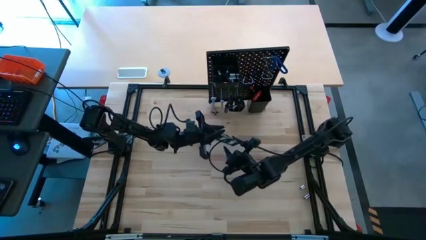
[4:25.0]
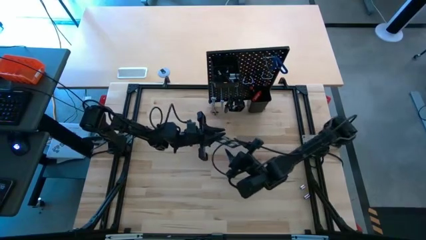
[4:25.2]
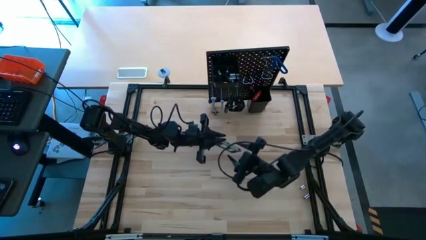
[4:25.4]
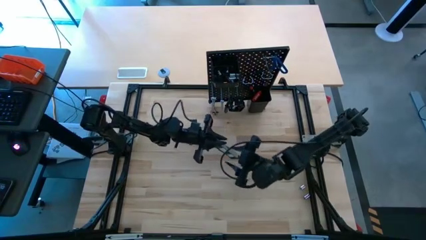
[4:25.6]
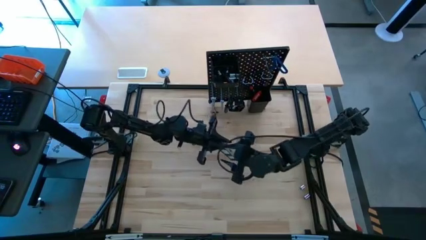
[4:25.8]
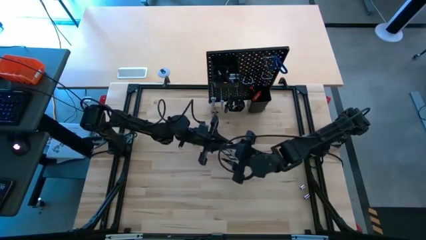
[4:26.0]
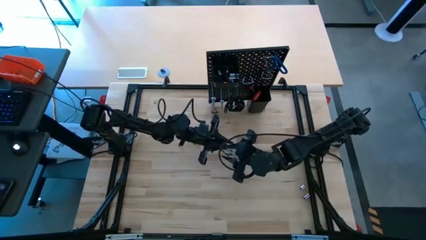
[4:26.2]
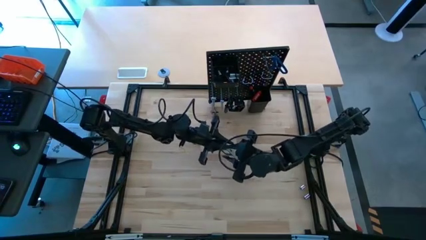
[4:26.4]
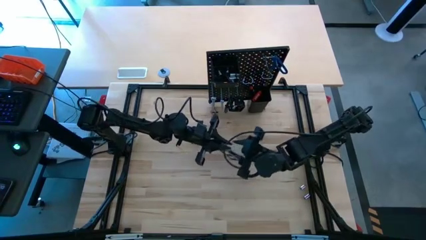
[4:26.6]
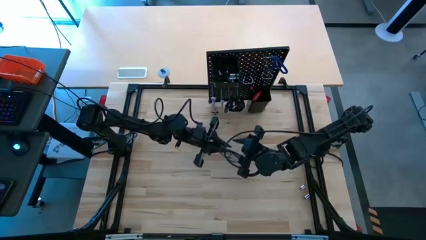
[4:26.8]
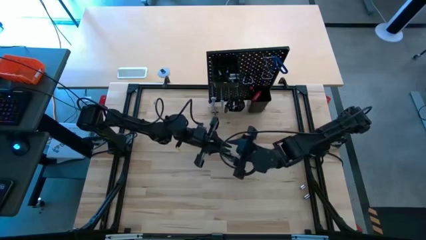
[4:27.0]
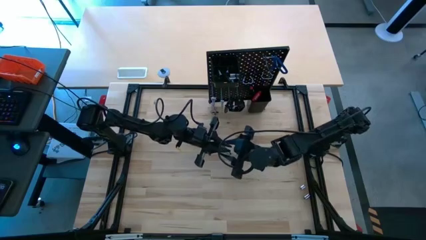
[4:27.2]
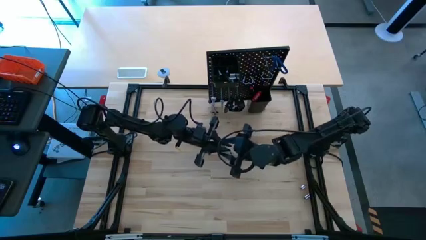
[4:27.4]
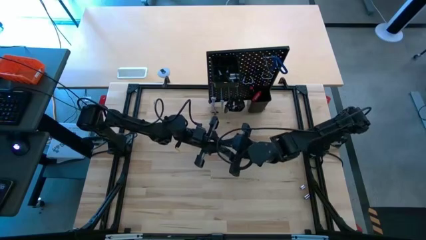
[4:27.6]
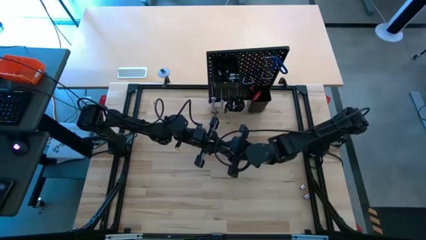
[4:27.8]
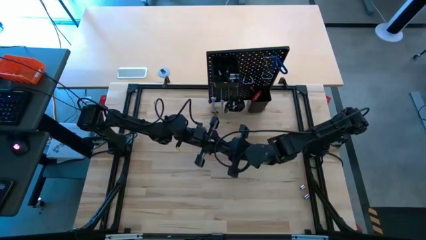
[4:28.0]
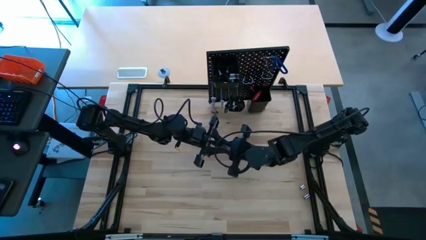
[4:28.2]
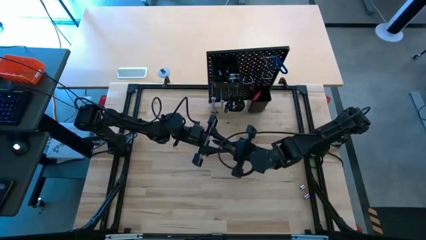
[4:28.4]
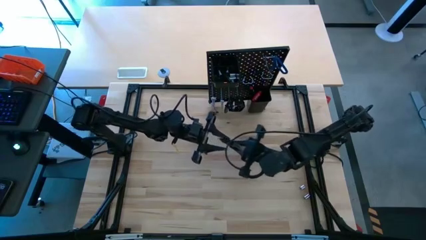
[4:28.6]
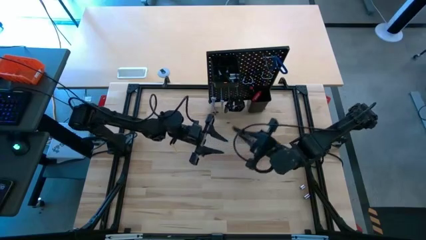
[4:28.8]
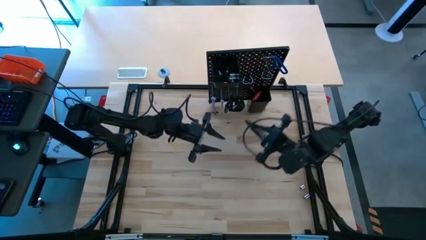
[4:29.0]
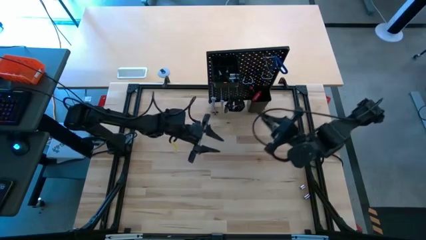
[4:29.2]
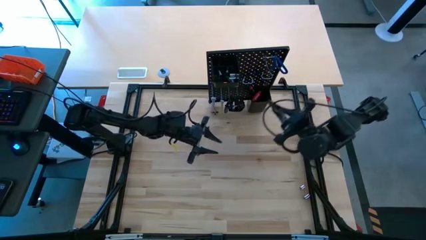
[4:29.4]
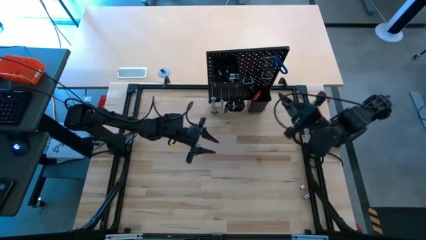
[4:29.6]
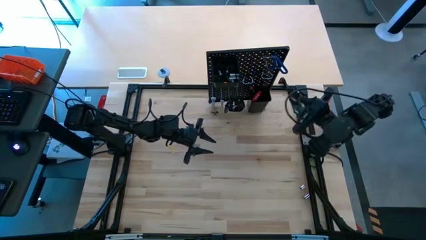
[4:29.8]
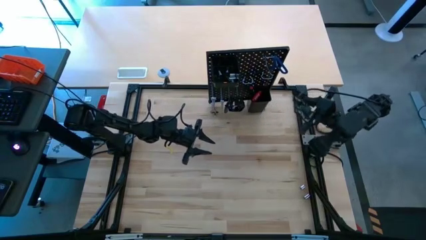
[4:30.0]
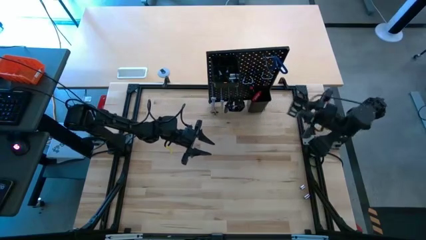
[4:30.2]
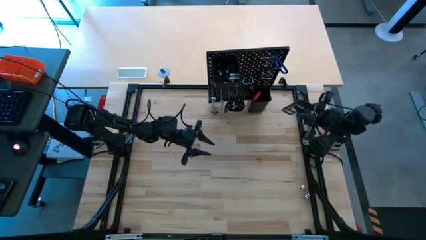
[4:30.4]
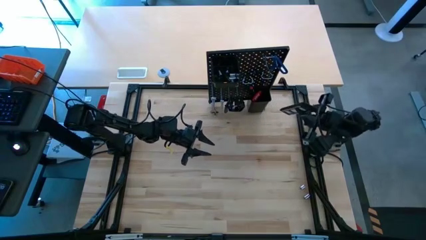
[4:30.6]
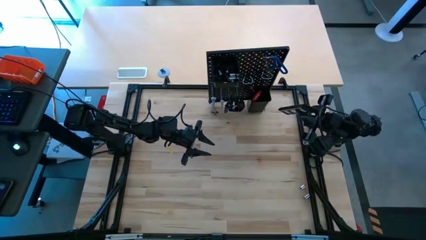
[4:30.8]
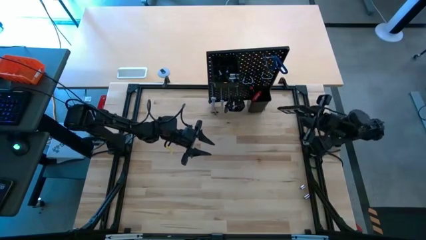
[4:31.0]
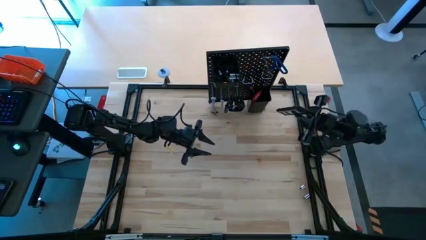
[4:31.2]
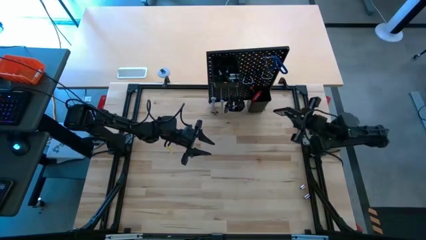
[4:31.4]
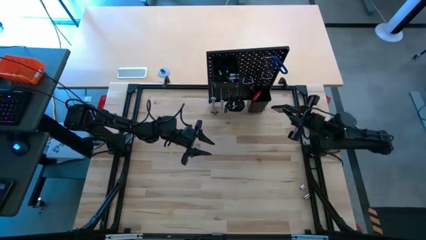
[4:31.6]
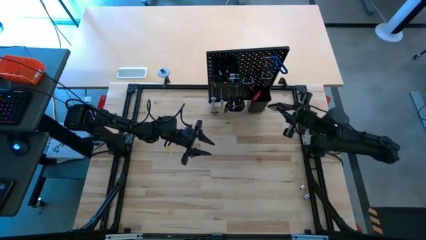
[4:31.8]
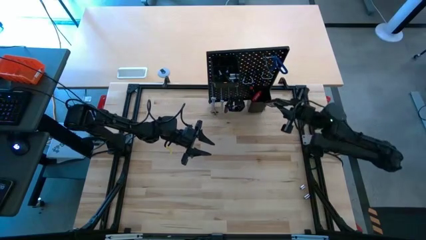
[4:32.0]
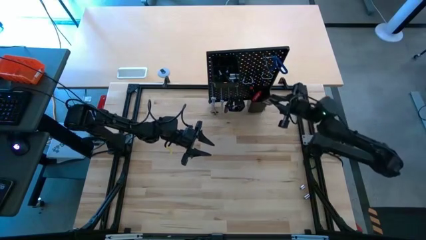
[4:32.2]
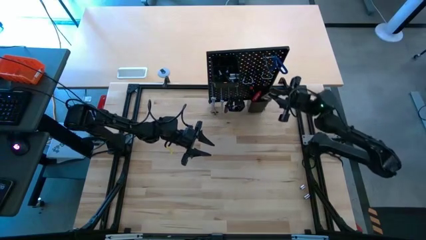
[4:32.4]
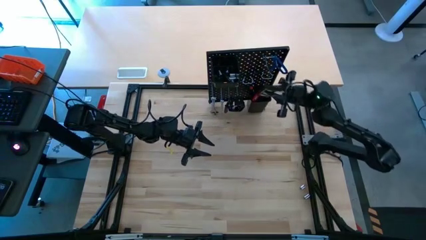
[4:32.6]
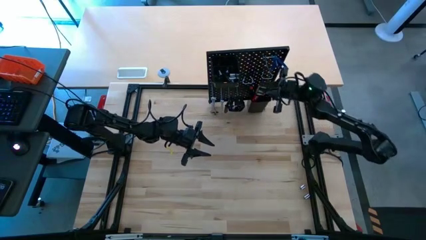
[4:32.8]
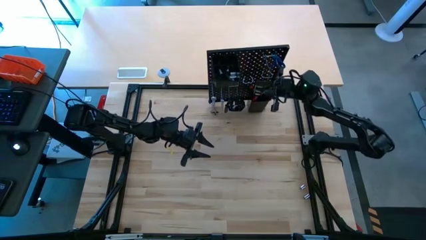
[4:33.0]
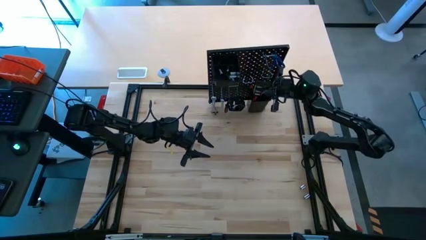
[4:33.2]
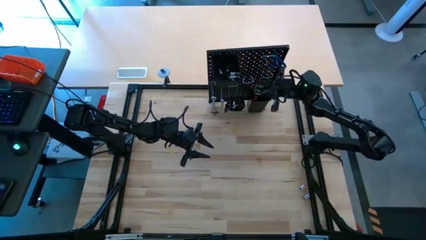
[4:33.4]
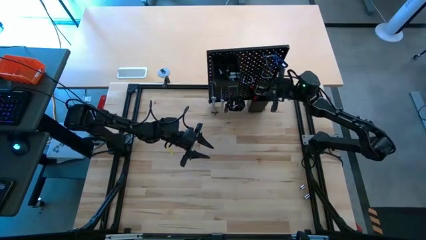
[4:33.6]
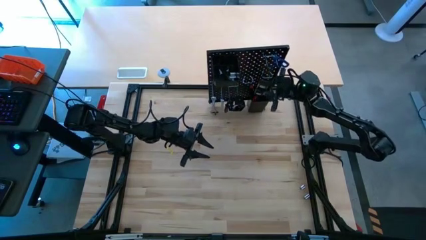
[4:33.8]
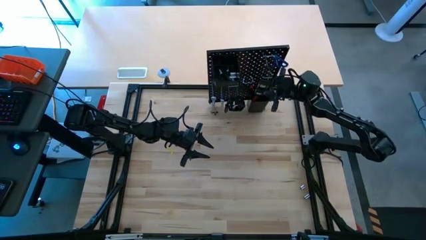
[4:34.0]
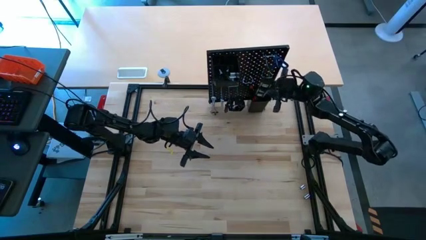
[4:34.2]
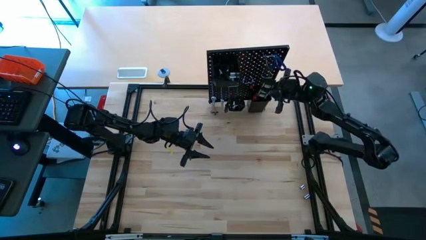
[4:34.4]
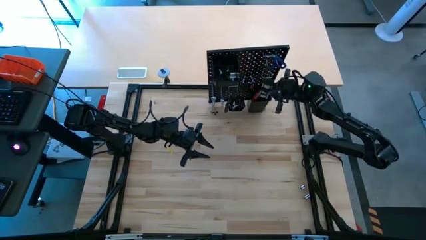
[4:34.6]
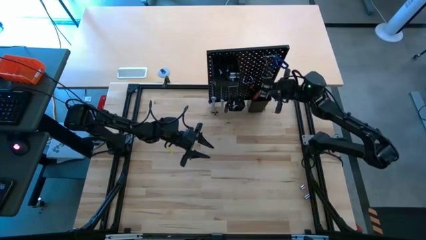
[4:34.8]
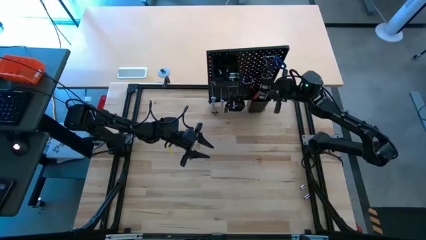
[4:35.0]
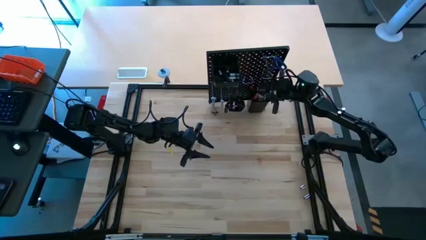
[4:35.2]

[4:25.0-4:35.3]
Task: Hang tools onto peg board
Put the black spirit level into the bottom black bin on the peg board

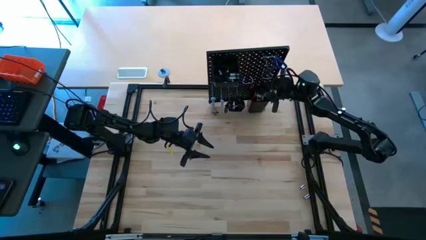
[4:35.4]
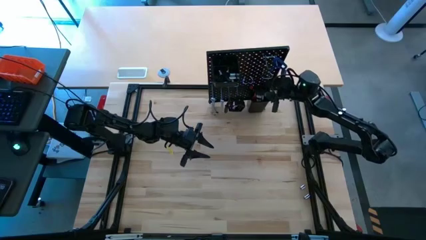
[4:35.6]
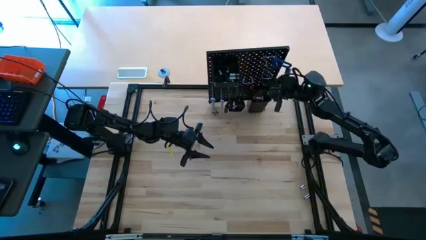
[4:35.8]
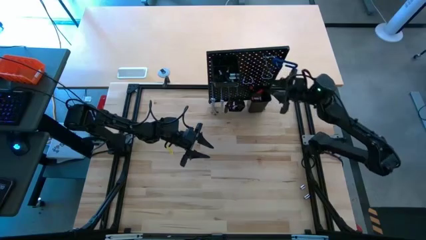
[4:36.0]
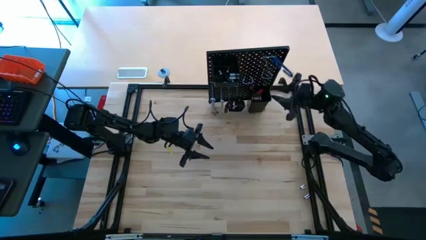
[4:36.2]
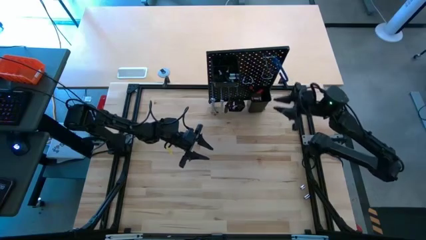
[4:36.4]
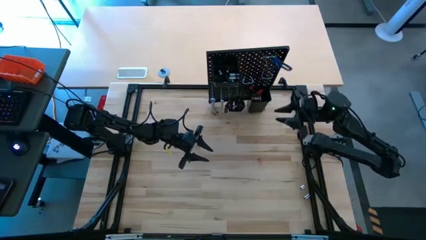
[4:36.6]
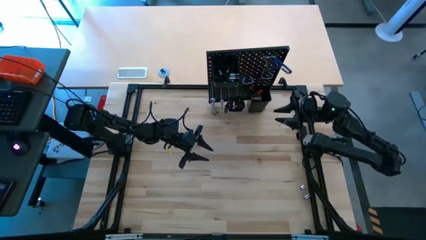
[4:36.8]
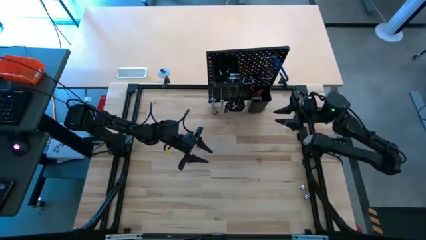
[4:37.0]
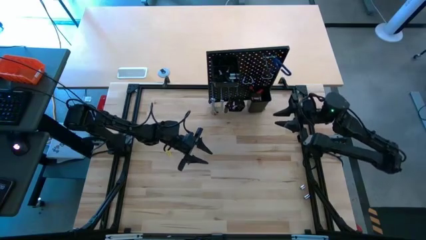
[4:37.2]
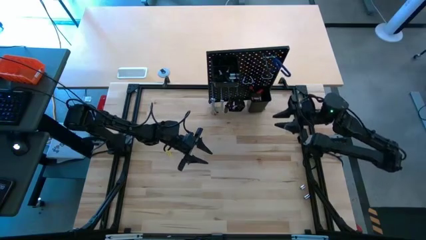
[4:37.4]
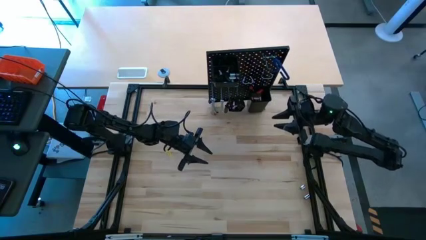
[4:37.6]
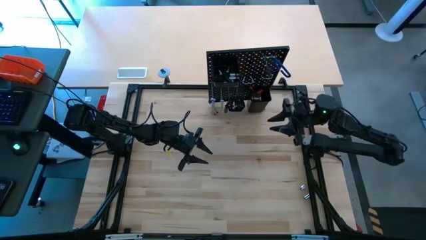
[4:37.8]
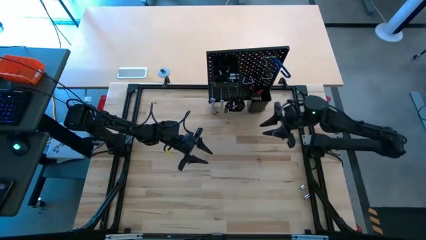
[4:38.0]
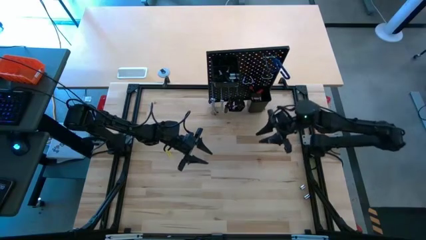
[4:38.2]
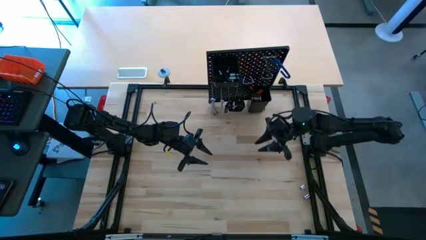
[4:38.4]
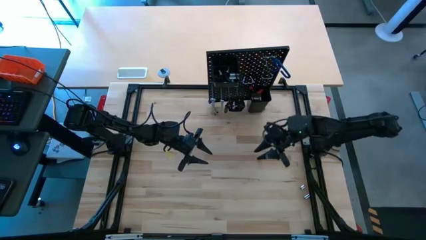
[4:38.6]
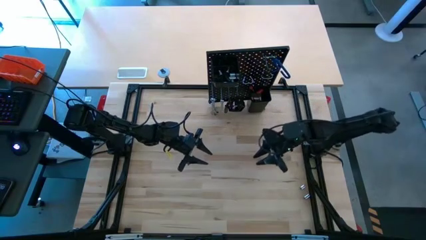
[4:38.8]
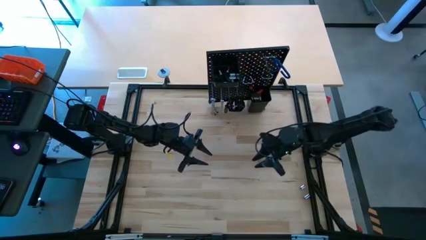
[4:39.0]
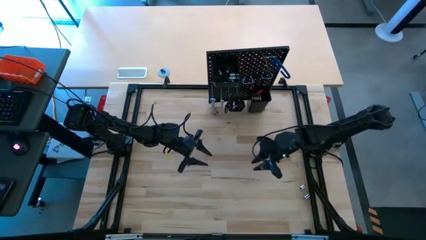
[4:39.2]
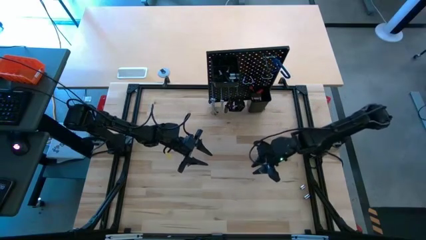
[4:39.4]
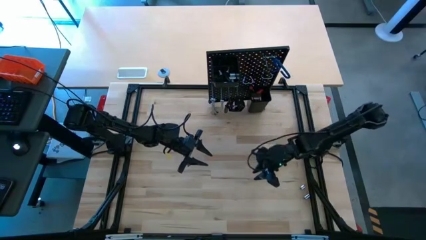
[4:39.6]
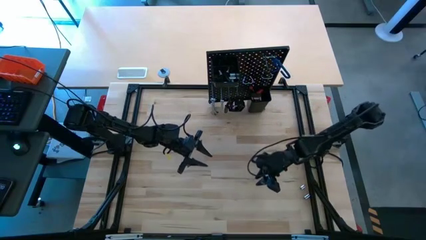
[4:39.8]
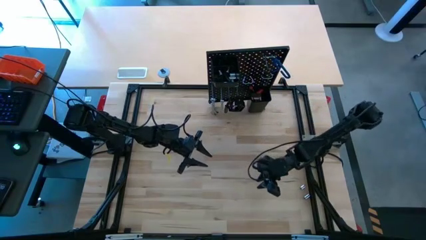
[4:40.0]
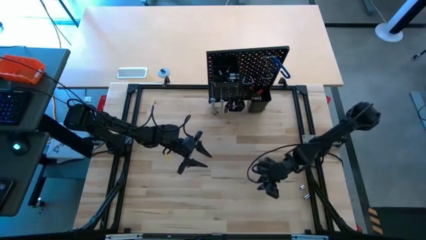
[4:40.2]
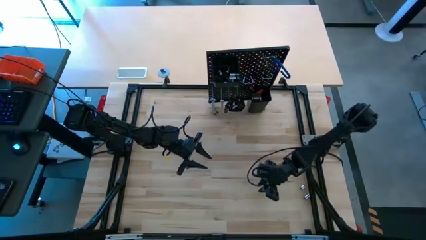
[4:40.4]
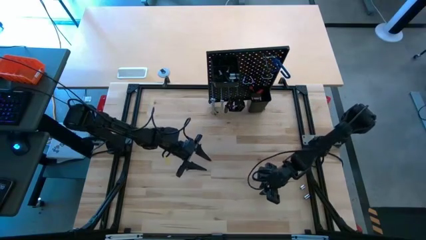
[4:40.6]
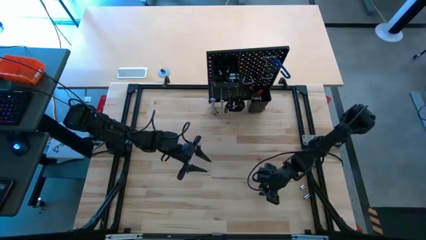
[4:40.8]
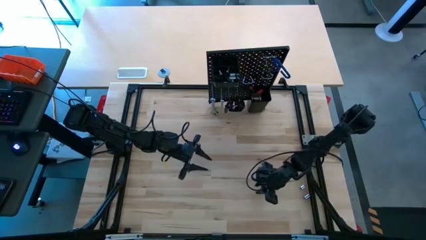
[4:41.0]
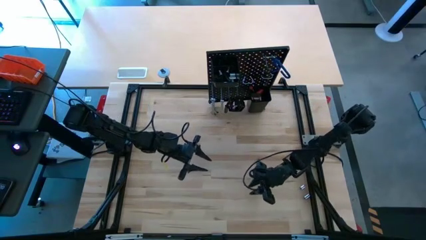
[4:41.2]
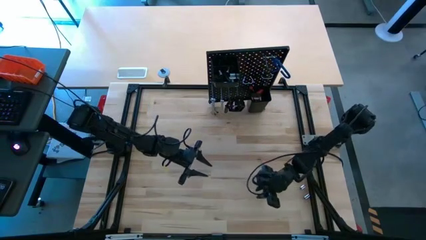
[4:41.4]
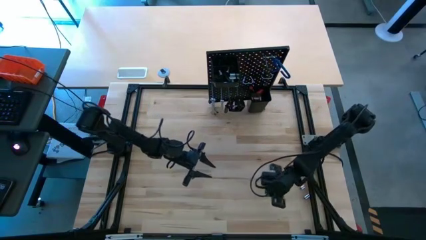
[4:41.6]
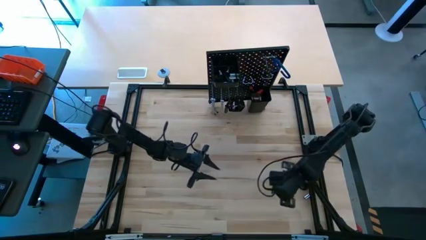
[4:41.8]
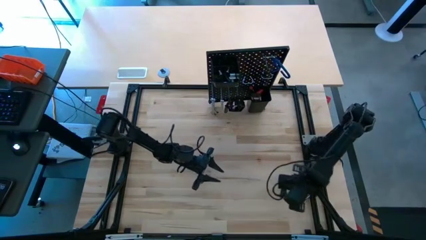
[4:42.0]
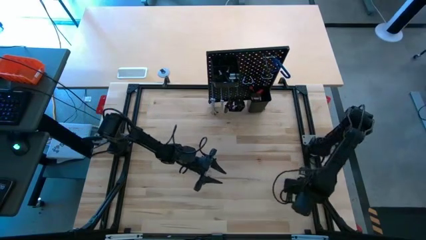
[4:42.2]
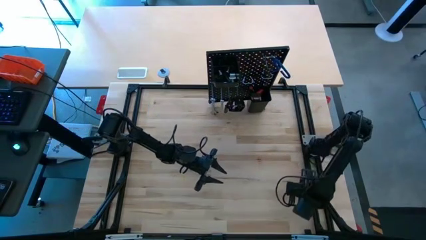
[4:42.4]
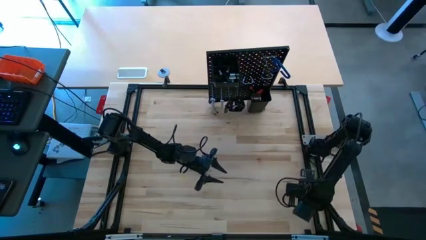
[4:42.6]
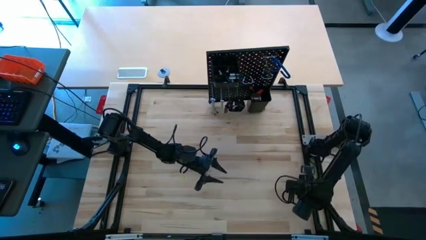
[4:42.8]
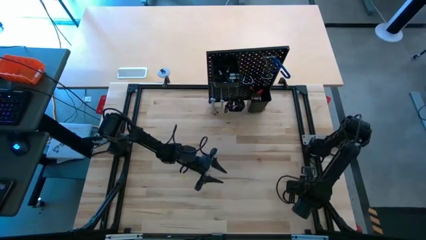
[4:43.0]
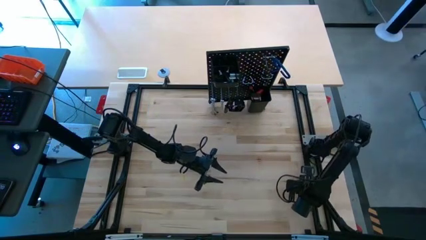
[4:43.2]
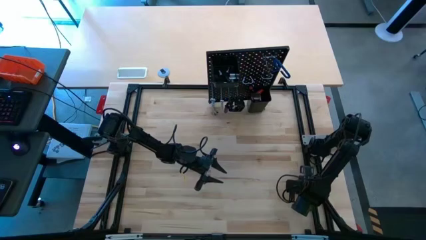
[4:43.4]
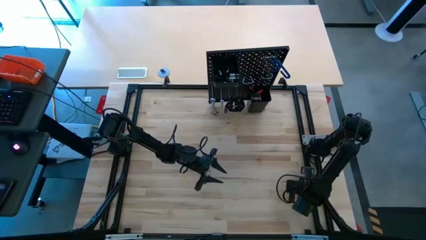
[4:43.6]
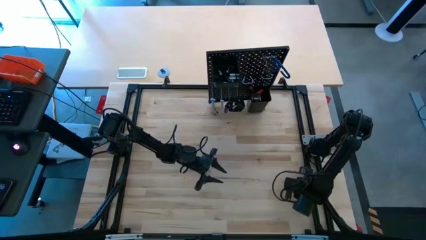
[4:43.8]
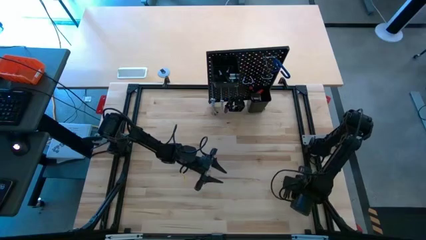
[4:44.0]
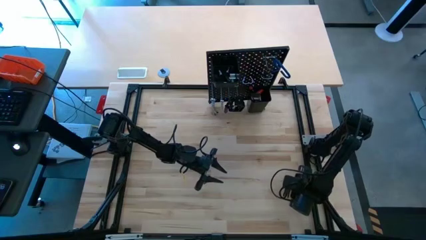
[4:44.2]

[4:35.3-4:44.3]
Put the silver socket into the top black bin on the peg board
